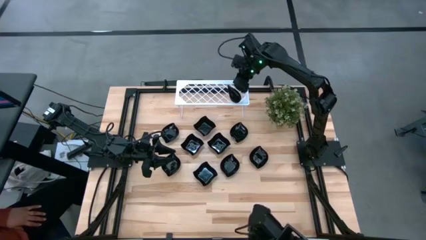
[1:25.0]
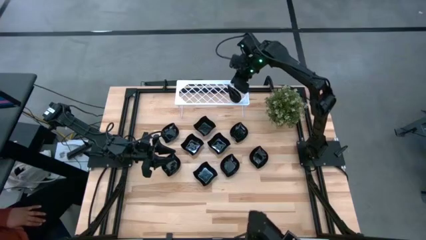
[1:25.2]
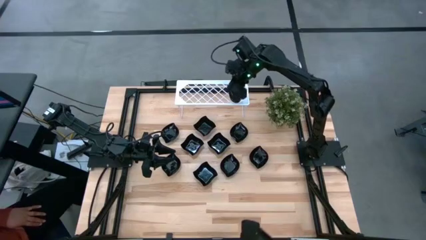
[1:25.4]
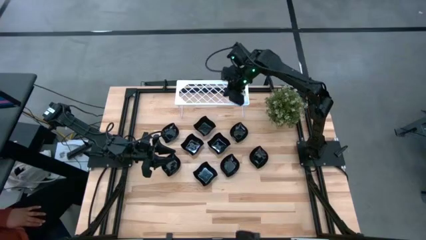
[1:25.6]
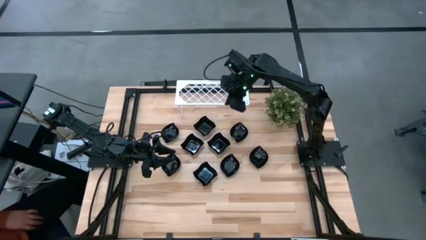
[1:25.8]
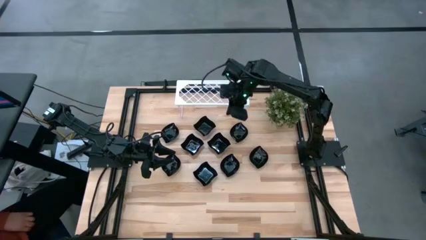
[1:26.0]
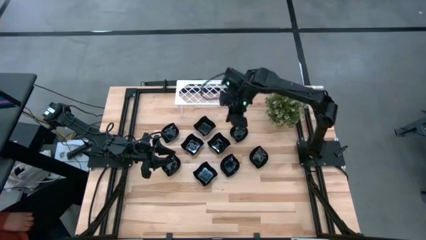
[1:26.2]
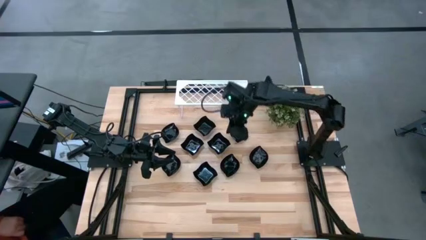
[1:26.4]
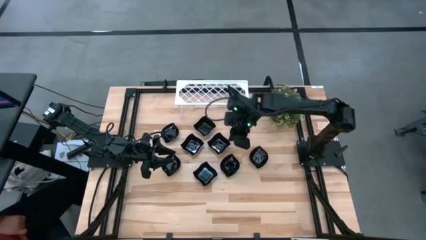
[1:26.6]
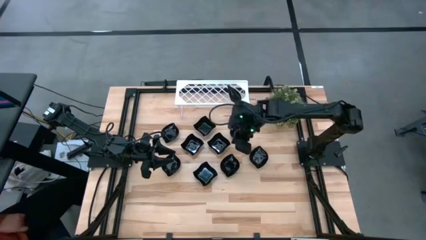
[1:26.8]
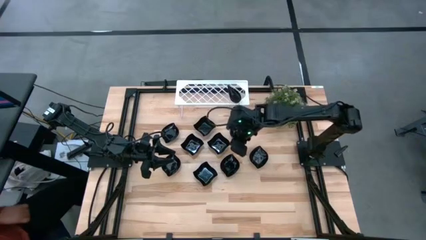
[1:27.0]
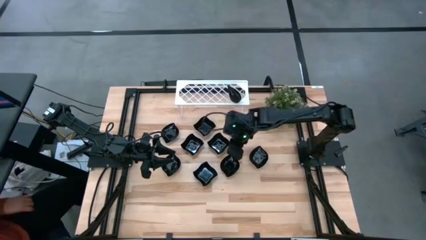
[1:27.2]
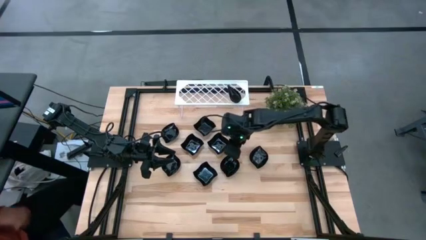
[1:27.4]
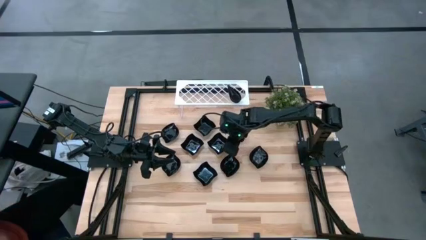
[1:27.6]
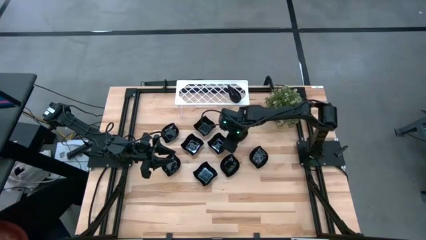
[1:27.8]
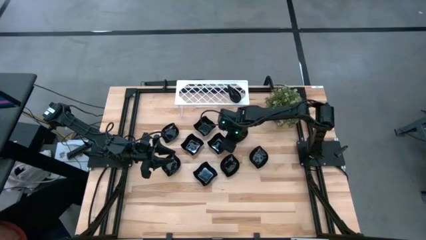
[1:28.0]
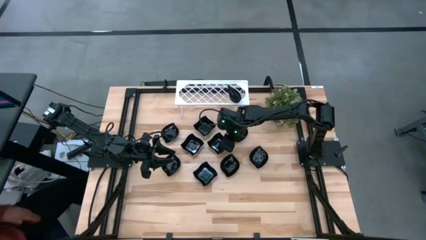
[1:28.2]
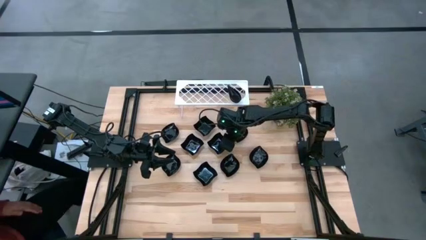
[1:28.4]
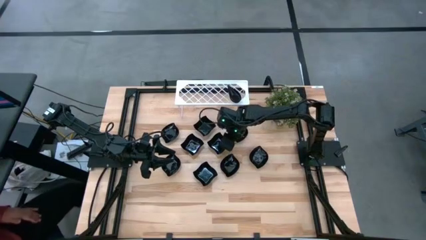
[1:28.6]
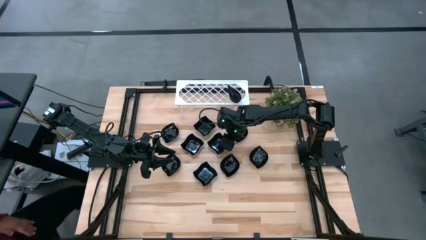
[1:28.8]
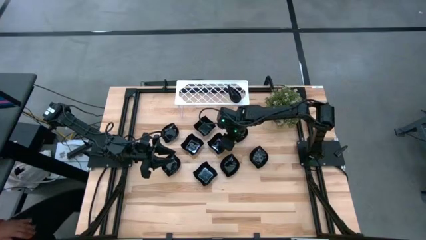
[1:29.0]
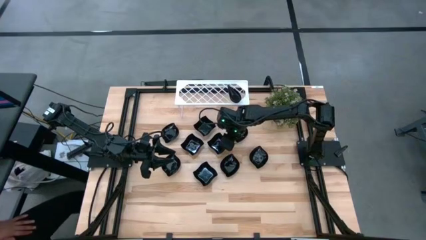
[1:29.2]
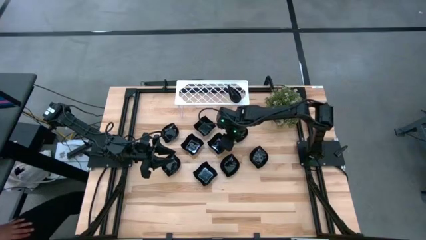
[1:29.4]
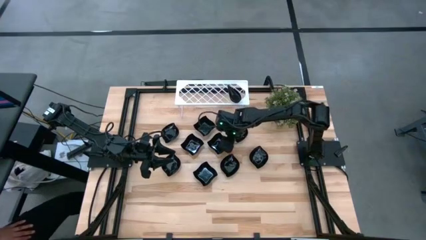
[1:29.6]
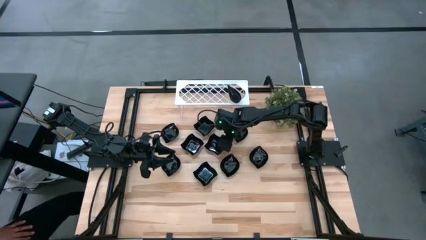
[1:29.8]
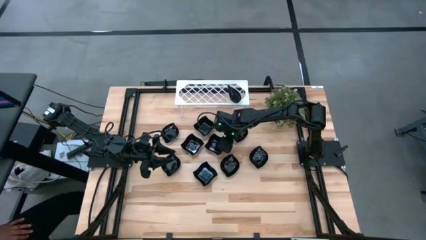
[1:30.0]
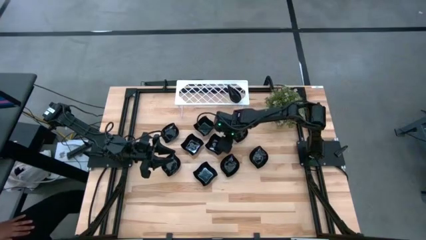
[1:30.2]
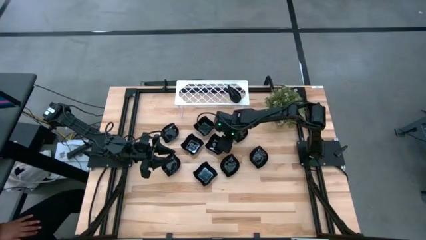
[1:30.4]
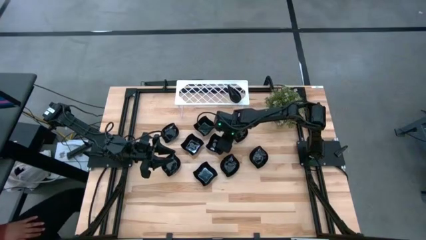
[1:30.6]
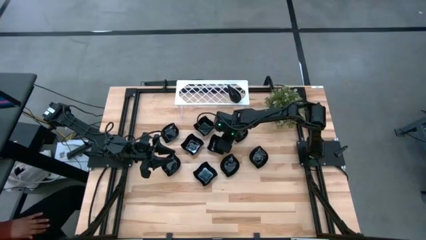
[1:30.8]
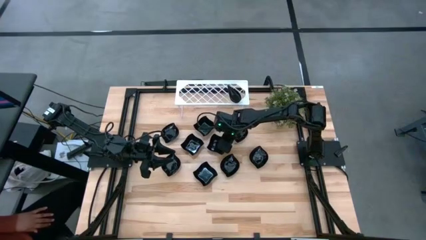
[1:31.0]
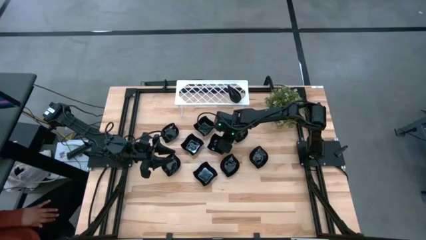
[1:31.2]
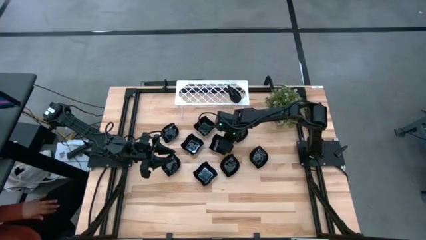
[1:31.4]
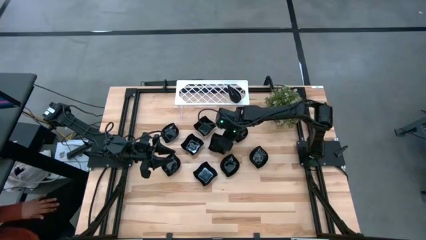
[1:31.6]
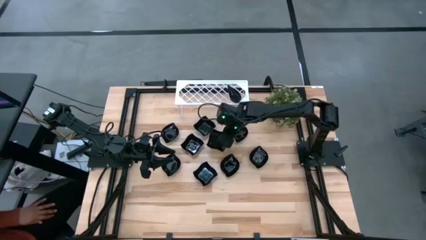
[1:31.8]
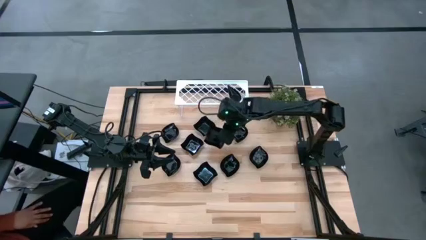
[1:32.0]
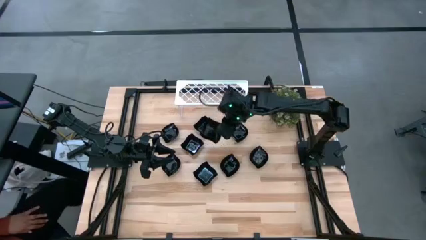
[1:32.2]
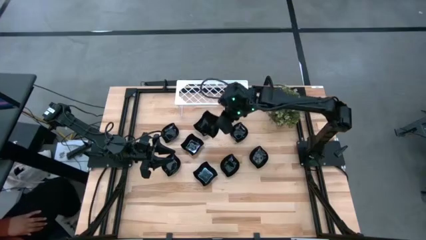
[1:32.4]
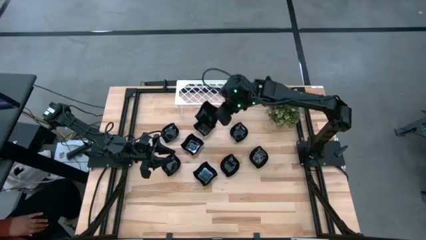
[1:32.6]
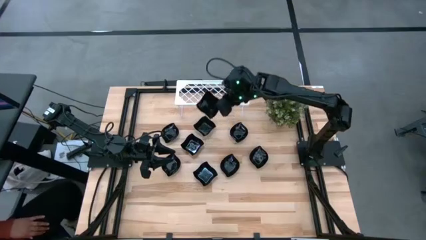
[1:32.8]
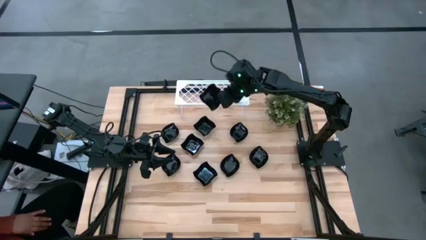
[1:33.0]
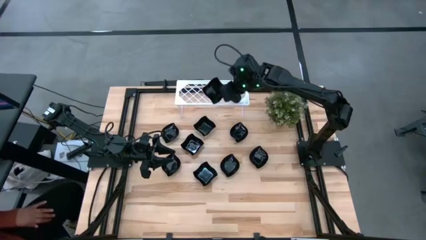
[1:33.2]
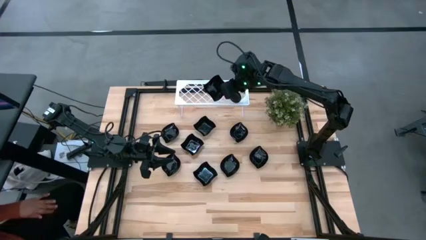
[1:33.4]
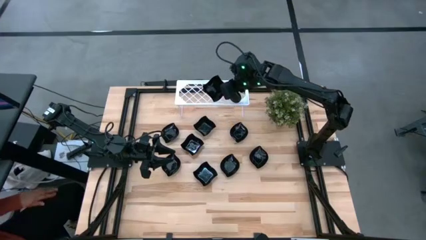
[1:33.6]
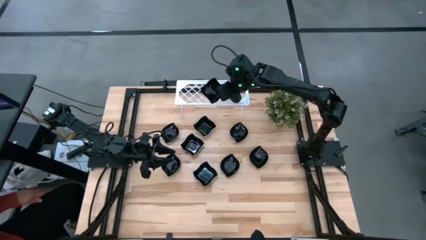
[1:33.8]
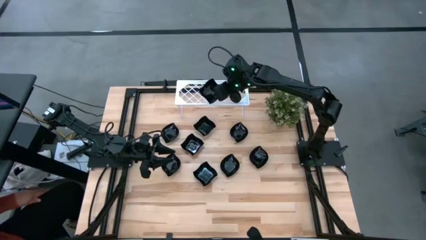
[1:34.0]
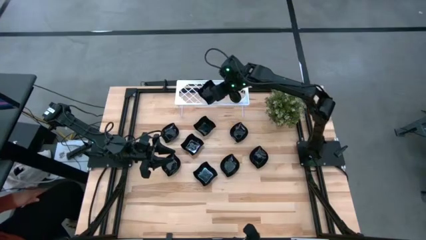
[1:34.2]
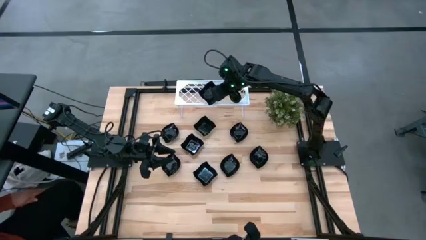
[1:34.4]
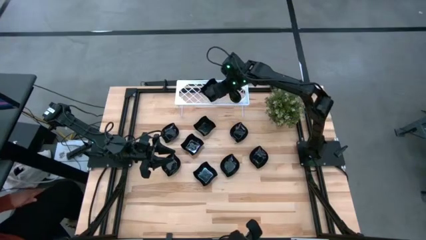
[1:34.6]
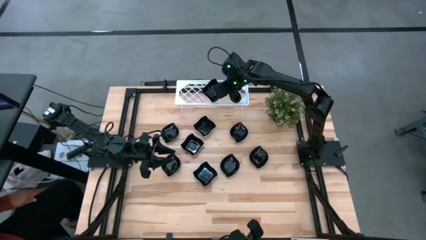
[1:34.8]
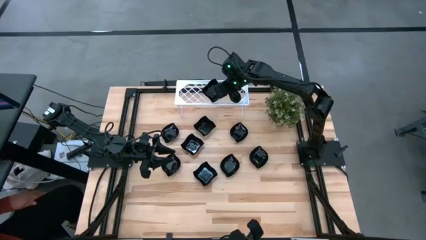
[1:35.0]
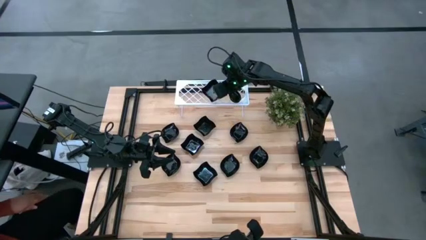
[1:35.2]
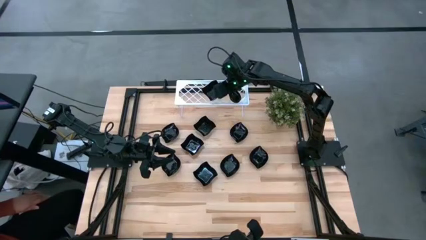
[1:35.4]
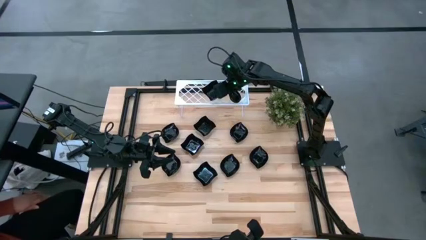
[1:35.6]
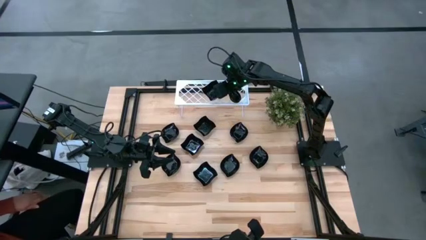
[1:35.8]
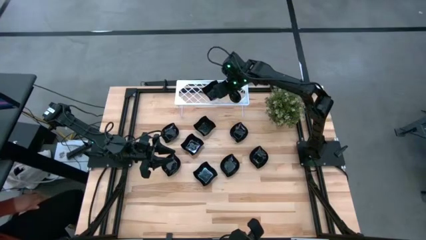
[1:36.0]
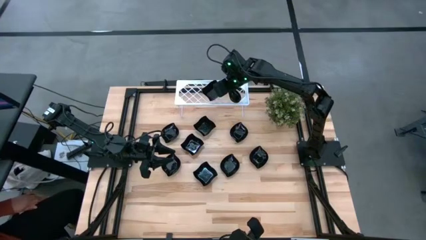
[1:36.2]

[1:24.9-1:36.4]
Task: Pick & Place Mini shaped plates
Put the distorted square plate on the shelf

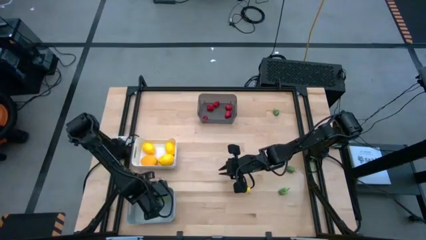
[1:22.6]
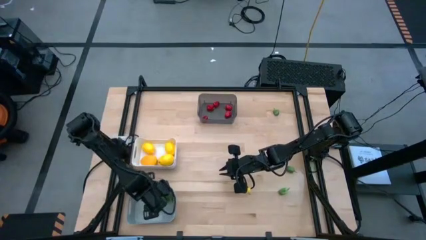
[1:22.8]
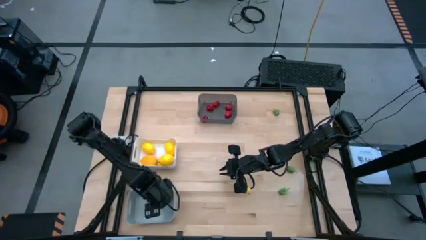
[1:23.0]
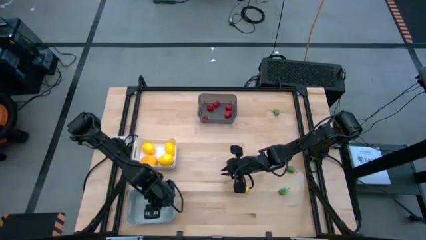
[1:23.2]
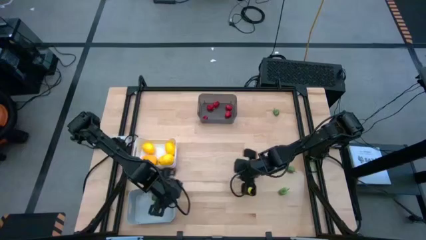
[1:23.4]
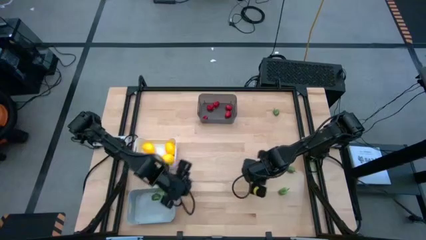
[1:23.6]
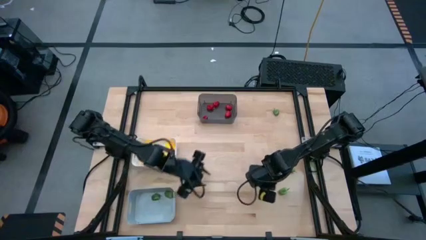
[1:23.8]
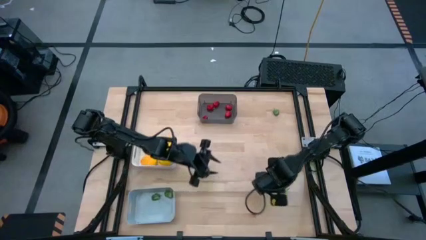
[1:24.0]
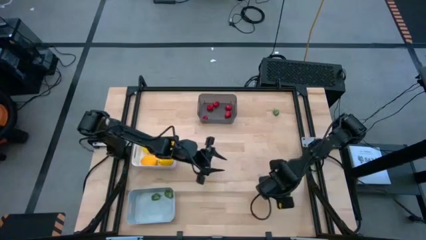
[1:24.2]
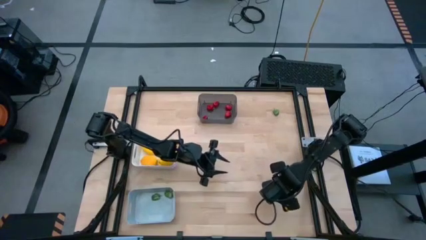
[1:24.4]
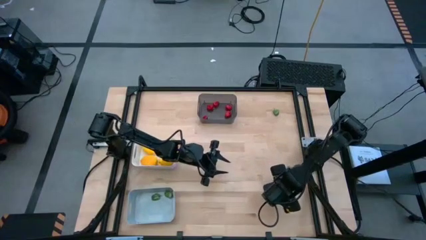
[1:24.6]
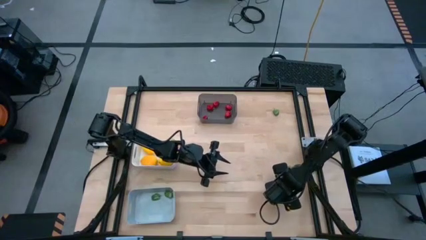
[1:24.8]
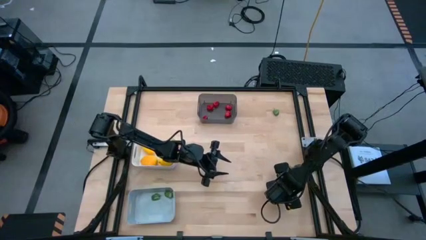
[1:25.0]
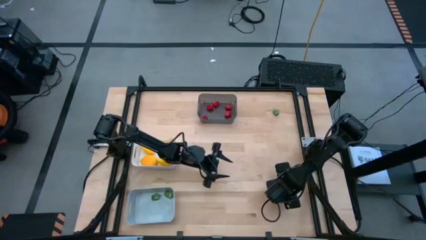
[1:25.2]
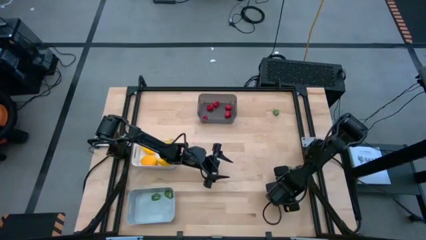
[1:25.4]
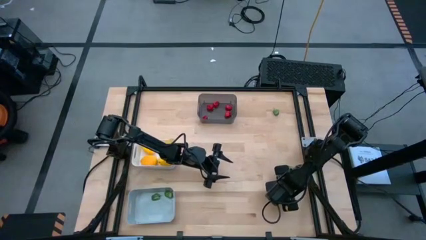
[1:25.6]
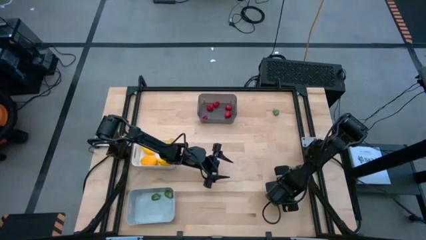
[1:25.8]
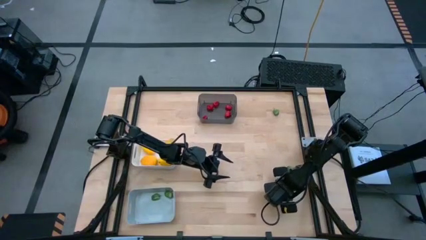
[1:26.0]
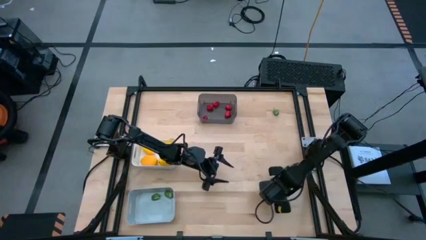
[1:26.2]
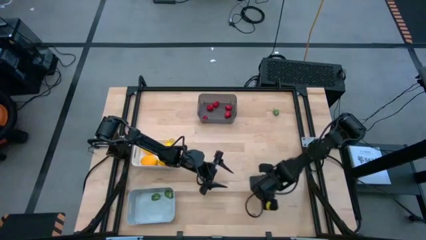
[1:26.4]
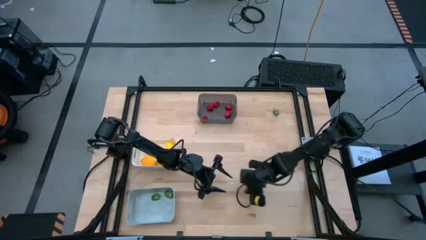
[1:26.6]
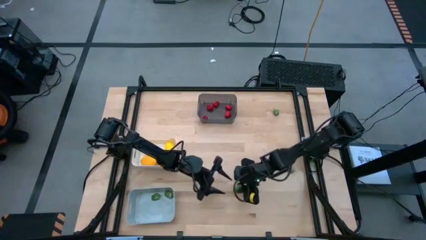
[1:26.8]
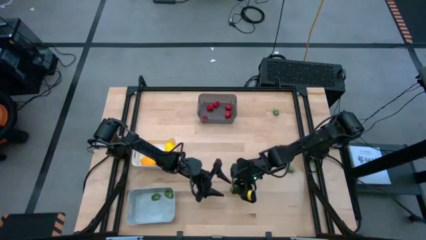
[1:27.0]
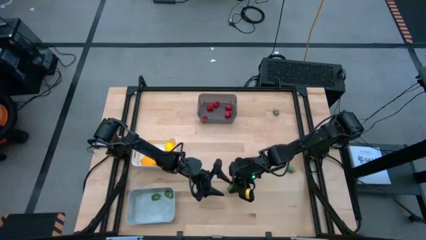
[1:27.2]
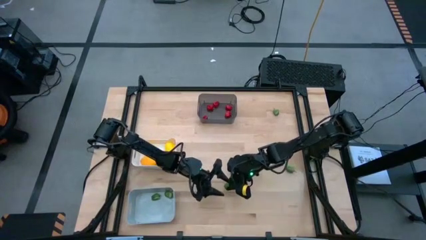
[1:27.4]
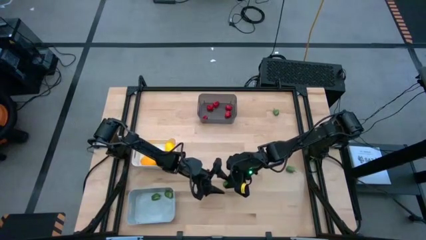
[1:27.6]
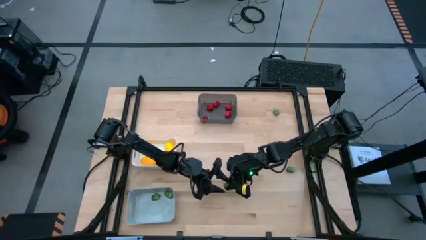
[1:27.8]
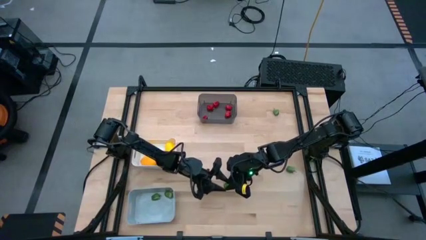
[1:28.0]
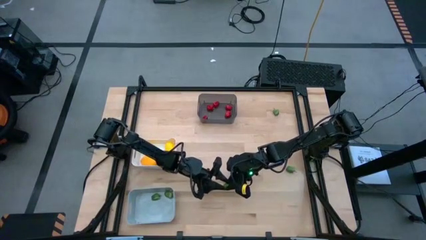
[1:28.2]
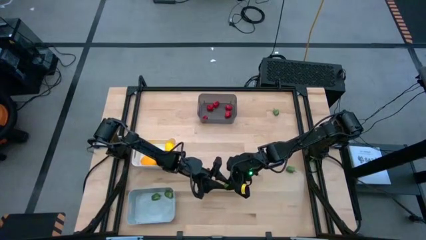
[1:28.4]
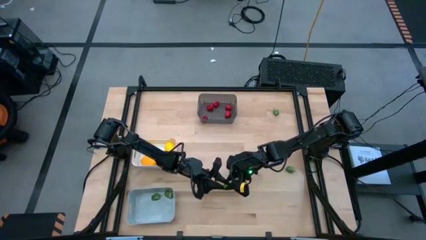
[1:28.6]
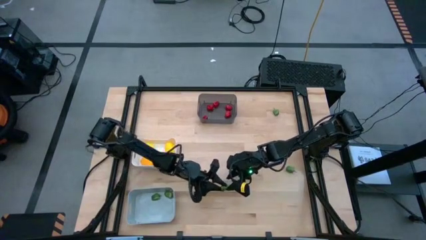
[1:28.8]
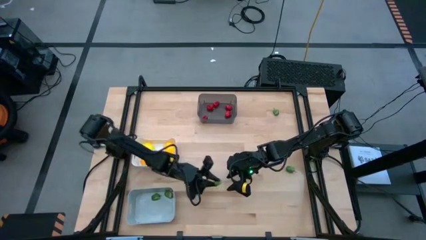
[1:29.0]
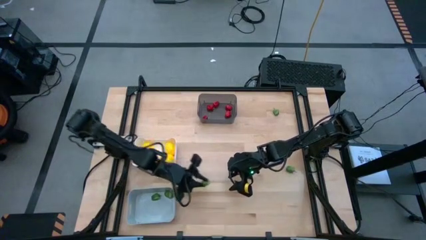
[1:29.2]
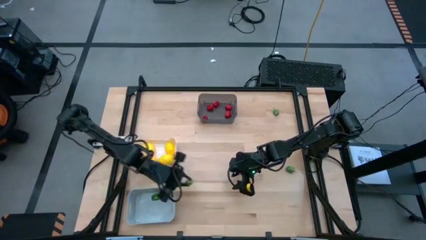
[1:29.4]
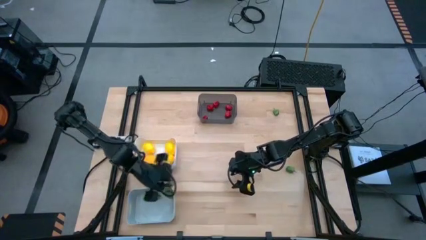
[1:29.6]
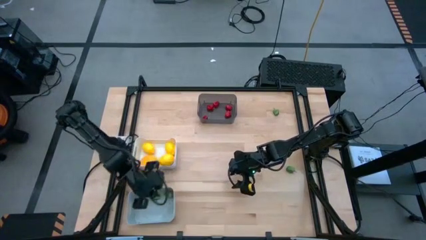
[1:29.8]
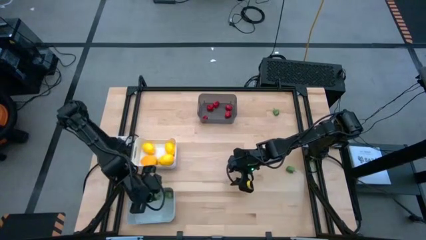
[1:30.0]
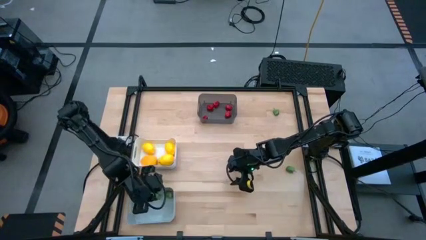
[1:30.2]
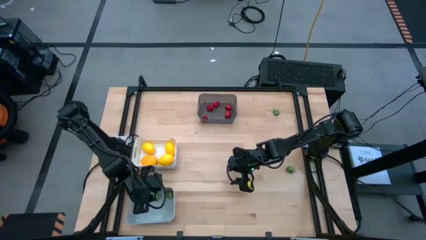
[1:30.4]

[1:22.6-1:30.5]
Task: Sort produce into baskets
Put the green chili pepper into the gray bin
